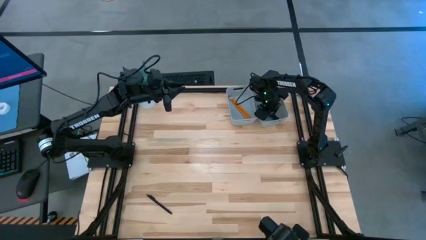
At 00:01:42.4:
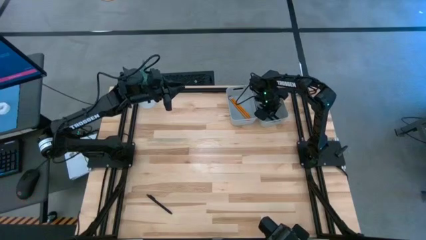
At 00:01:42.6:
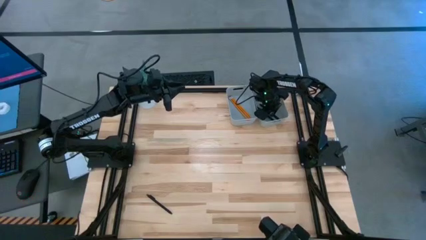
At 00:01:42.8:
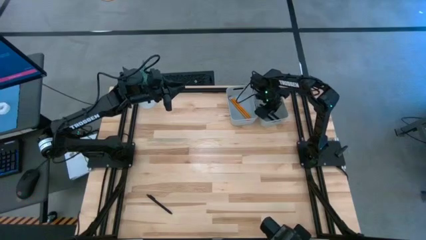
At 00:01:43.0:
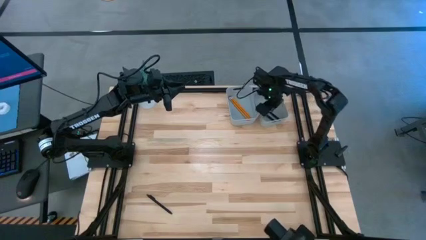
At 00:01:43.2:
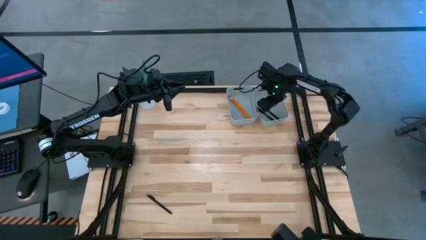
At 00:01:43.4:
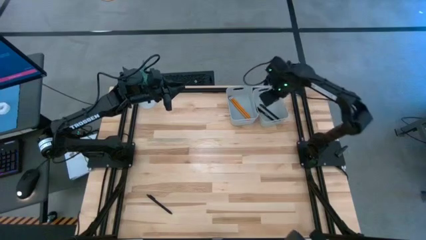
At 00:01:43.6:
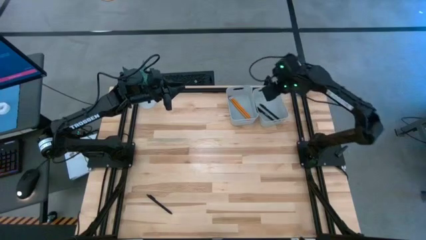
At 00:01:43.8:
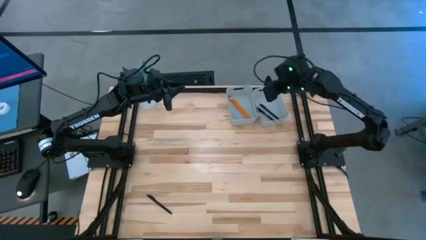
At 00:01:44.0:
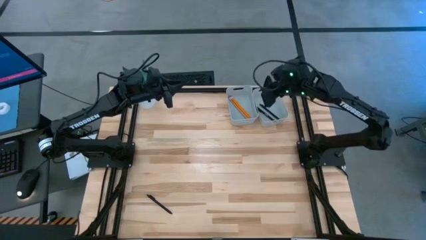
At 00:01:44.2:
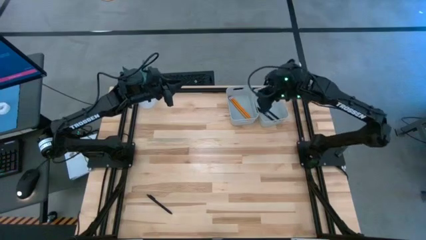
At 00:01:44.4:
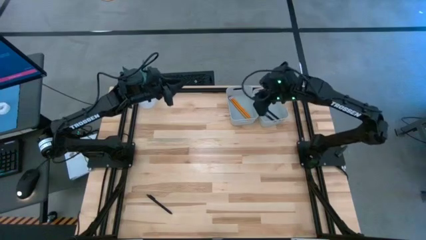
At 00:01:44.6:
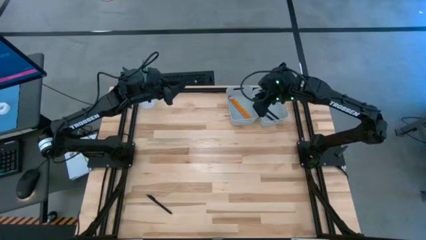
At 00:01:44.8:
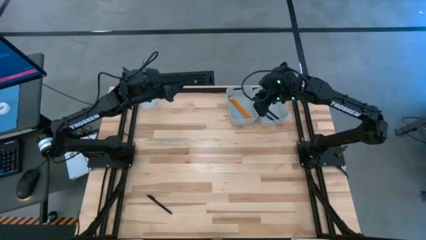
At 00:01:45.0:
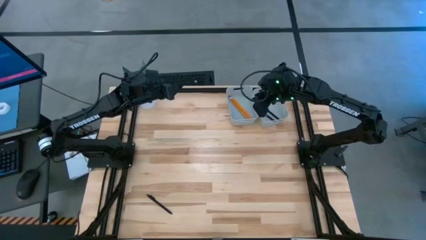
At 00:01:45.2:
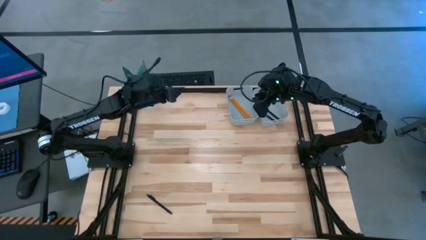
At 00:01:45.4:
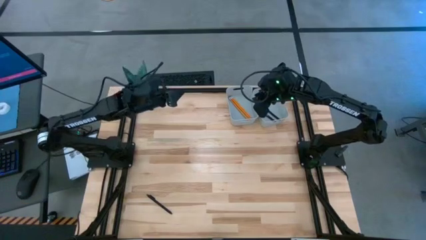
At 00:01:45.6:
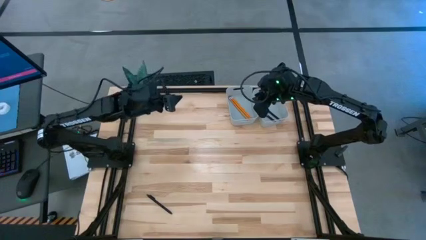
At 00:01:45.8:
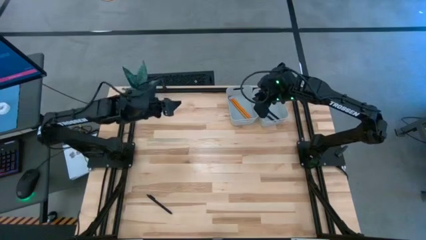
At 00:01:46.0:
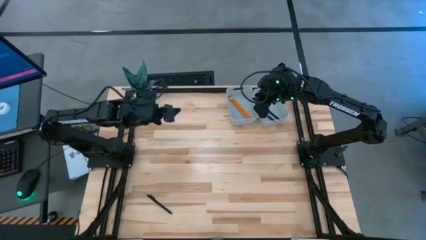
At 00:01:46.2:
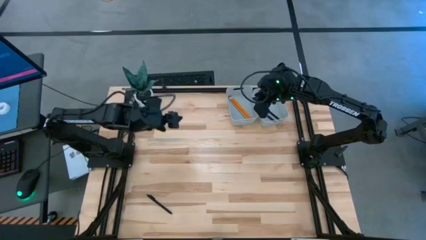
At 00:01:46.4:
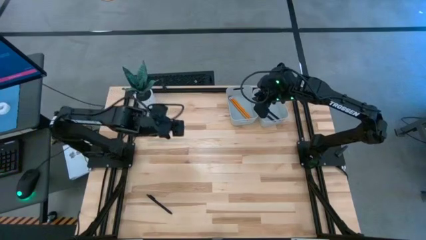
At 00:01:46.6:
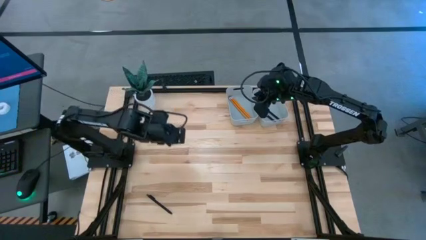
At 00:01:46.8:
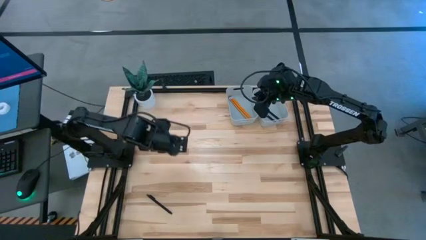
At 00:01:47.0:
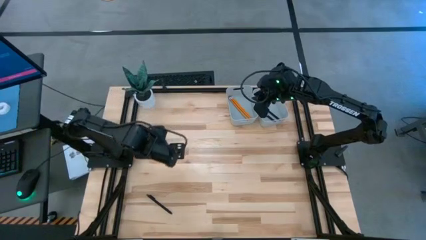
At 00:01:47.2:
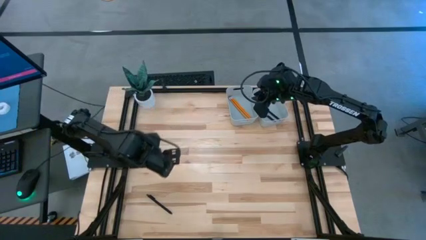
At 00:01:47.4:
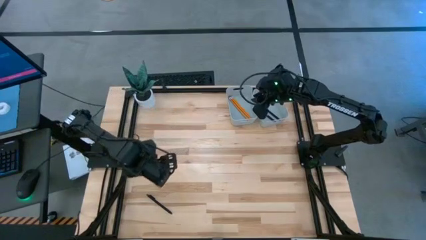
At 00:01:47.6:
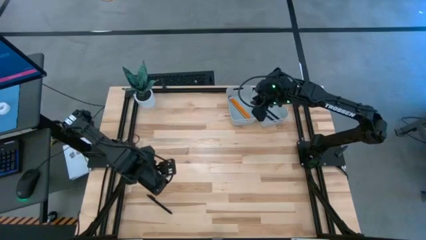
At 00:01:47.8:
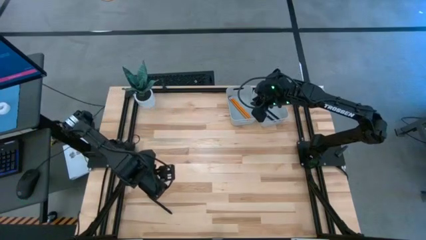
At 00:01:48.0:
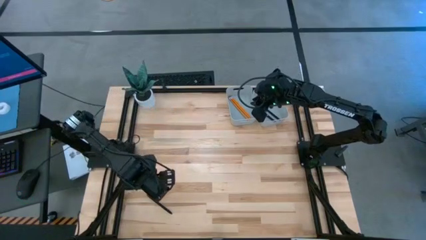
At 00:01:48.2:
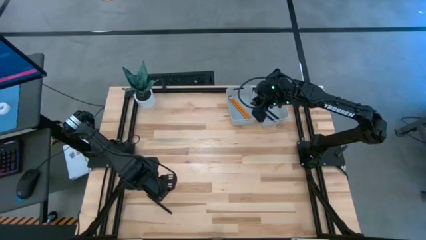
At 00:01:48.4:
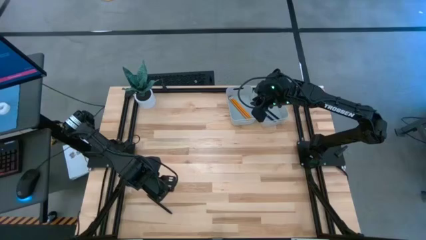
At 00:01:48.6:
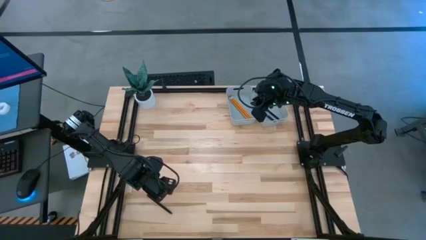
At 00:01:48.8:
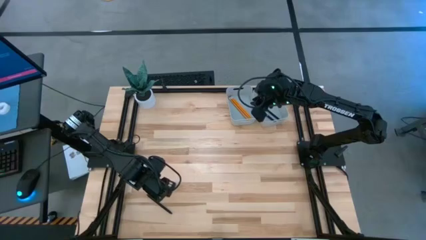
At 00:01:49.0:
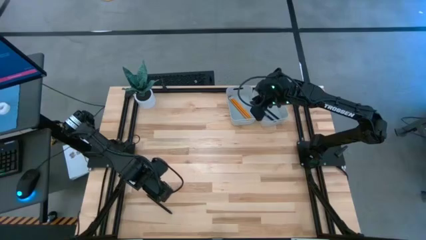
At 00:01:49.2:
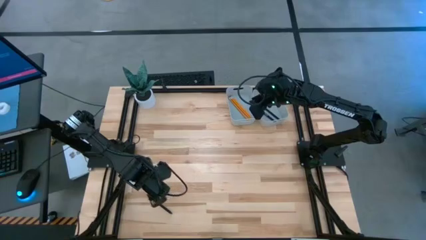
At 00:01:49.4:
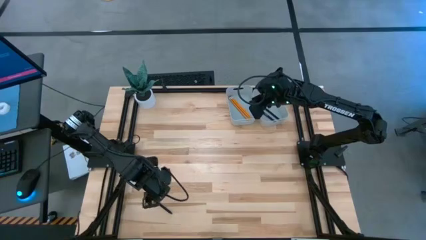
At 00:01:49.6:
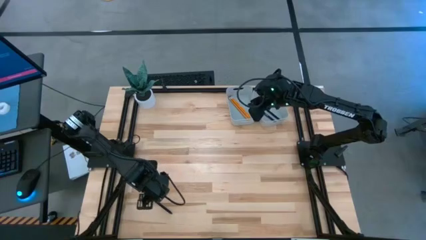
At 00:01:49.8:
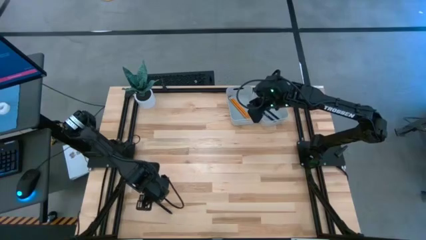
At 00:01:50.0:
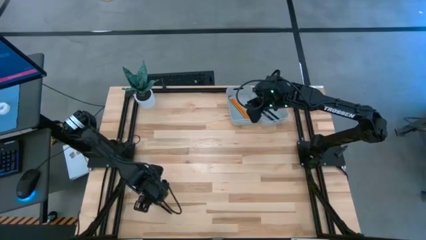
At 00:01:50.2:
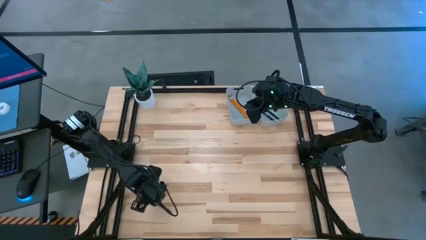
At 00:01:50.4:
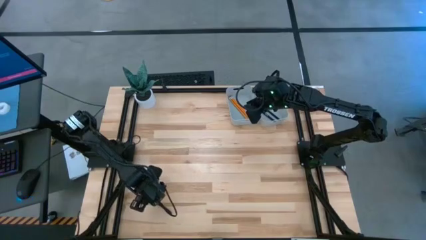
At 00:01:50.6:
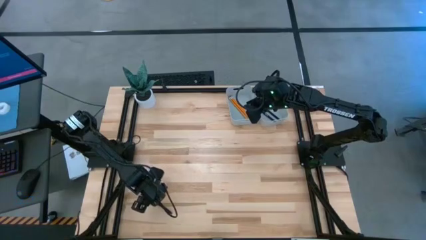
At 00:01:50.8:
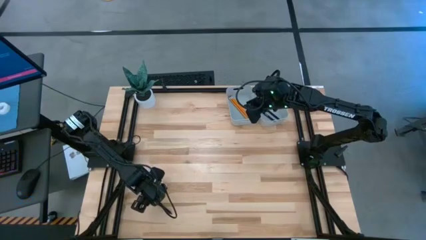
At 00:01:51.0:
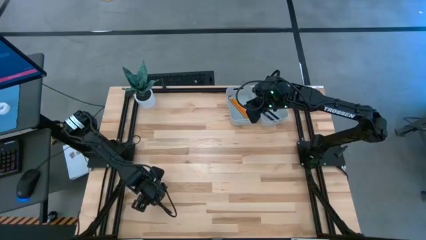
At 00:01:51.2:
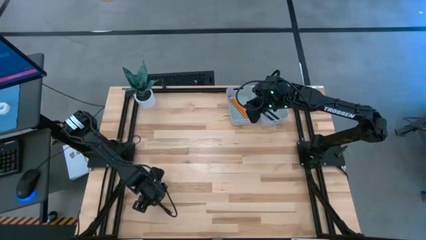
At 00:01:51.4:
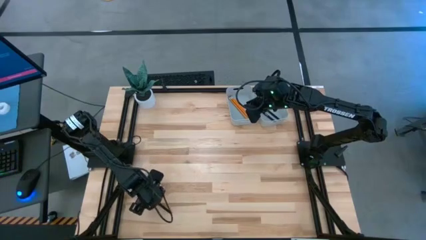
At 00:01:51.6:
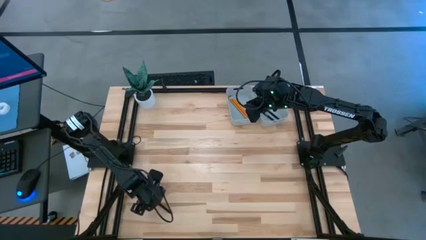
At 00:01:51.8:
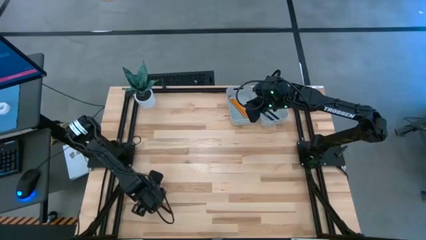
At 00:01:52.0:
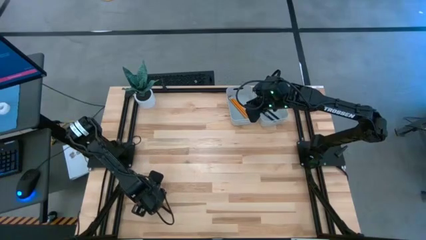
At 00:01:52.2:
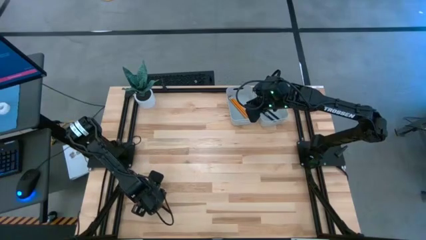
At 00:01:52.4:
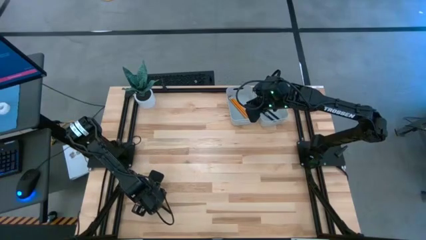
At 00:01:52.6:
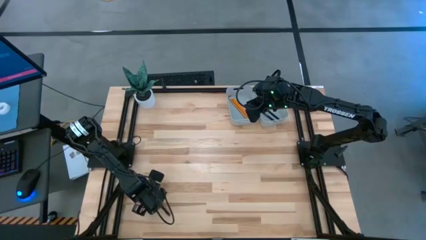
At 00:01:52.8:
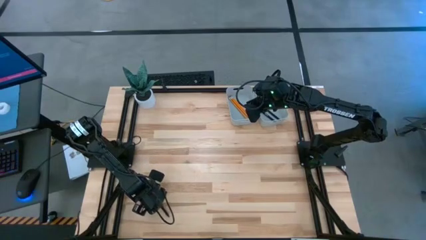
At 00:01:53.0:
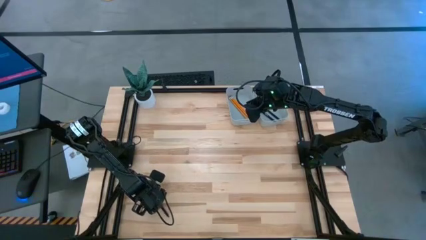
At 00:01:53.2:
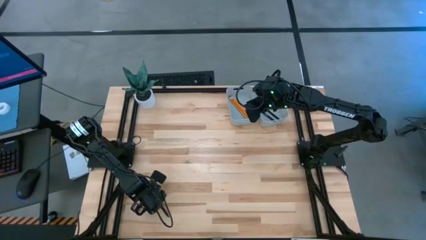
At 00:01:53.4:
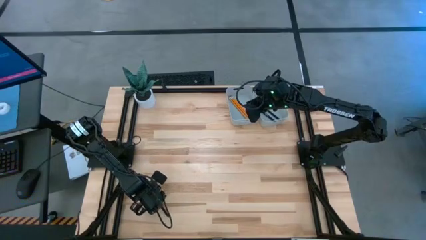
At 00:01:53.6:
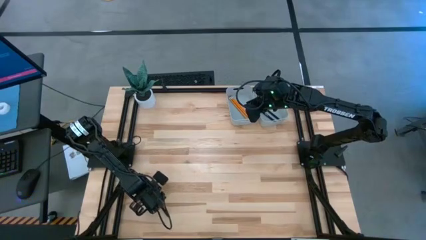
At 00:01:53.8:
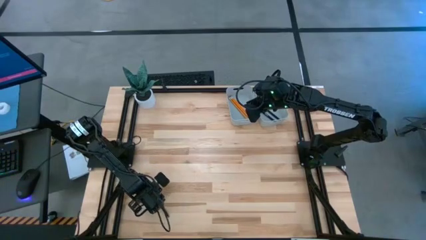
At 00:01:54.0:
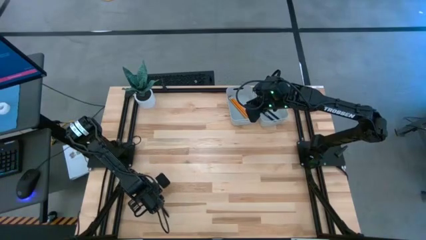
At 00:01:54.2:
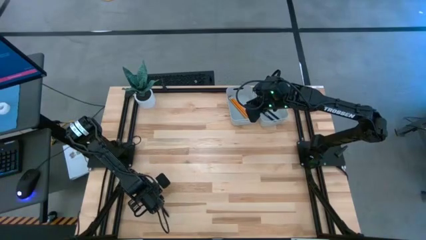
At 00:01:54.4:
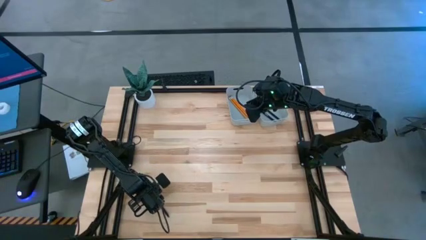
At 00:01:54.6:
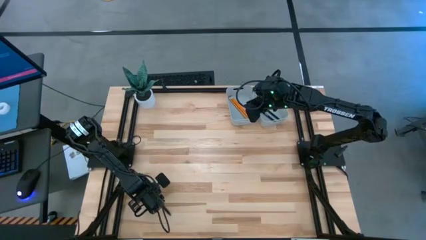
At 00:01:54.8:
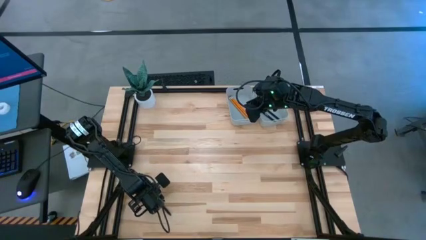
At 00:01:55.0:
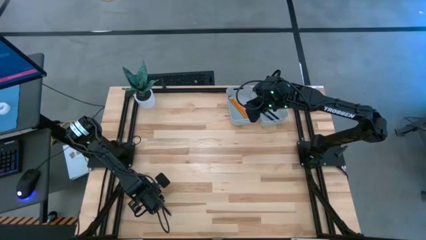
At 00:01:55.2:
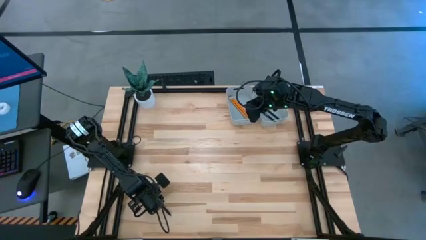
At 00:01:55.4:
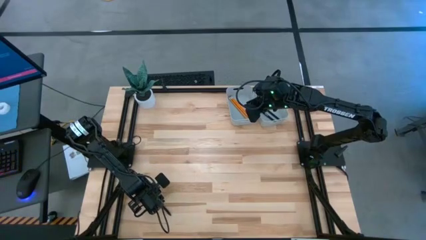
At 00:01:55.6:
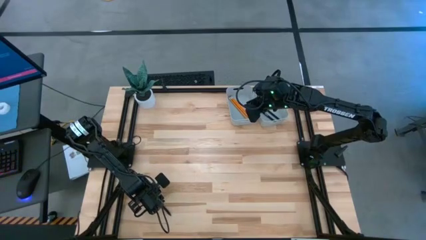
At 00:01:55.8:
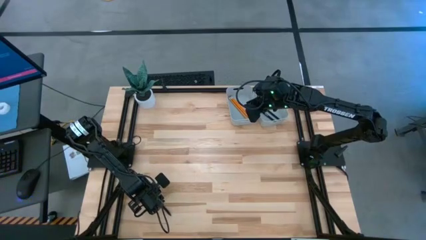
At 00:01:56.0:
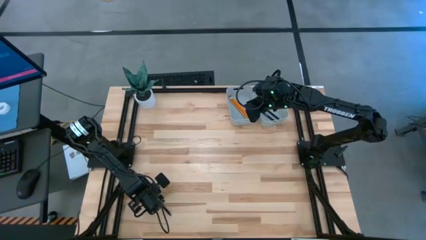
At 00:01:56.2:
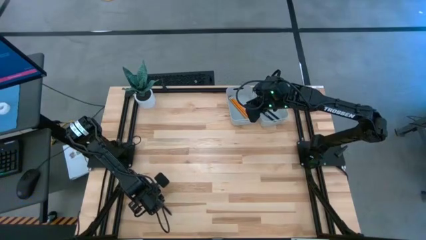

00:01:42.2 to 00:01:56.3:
Task: Sort pens & pencils
Put the black pen into the right gray bin
